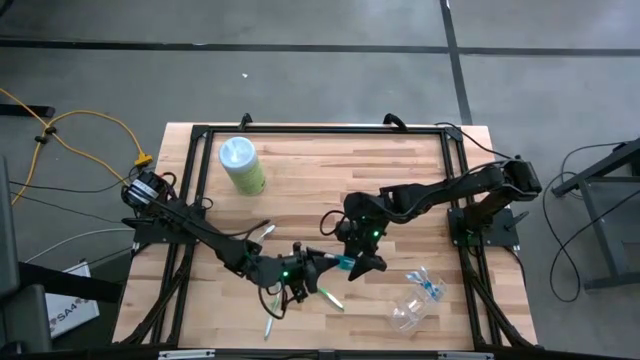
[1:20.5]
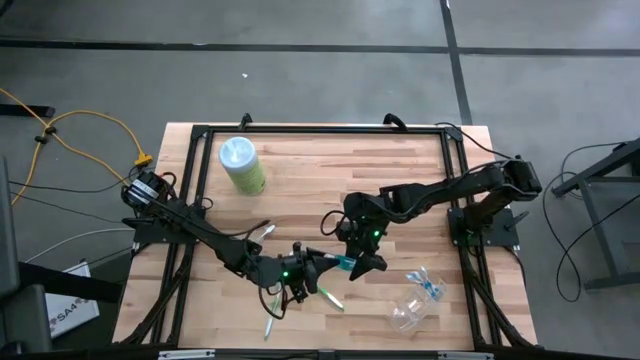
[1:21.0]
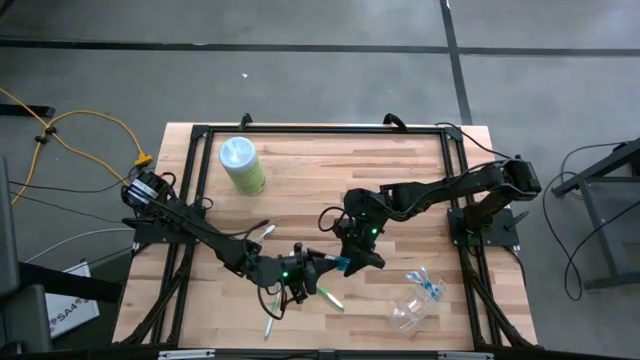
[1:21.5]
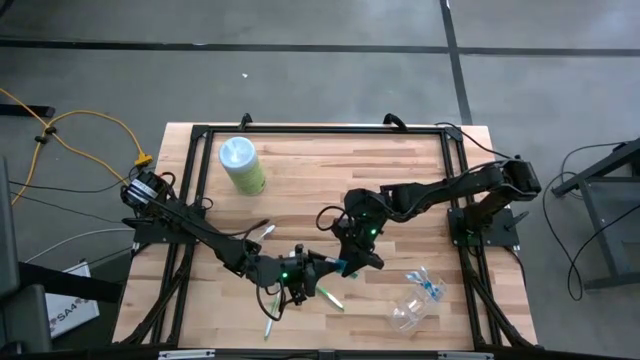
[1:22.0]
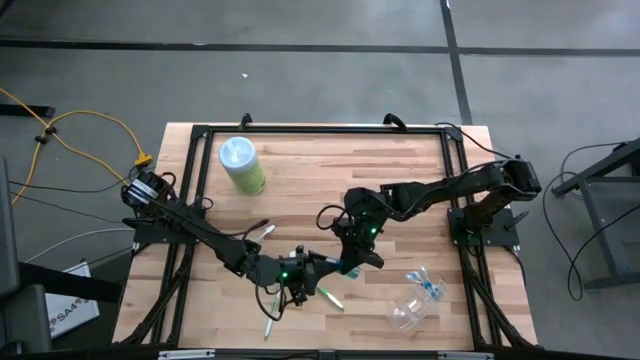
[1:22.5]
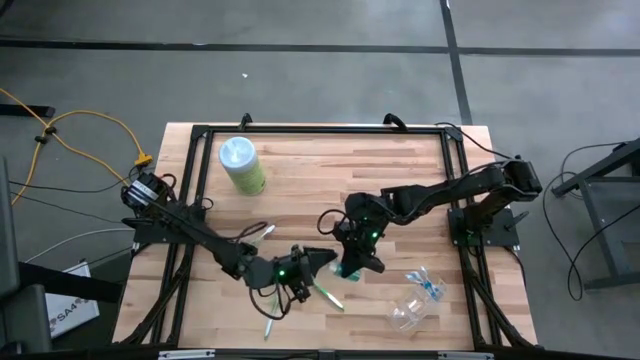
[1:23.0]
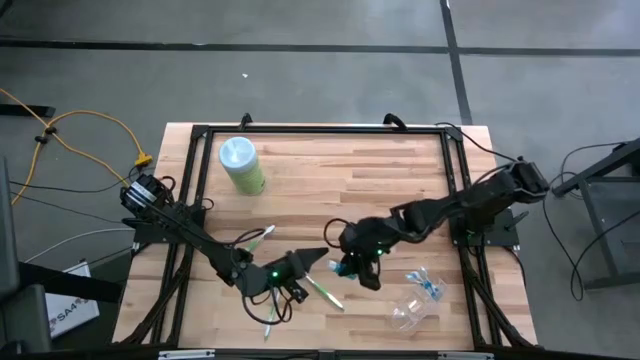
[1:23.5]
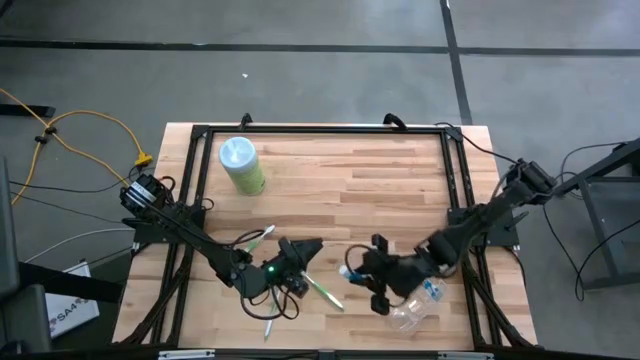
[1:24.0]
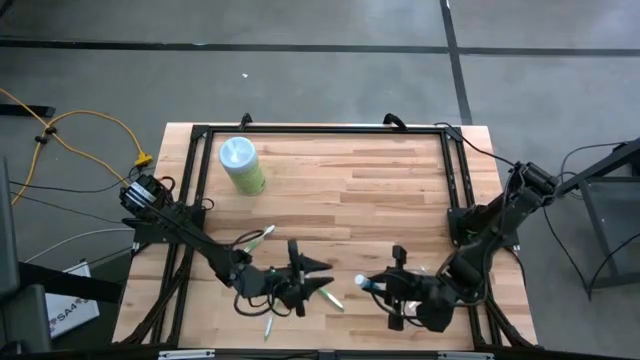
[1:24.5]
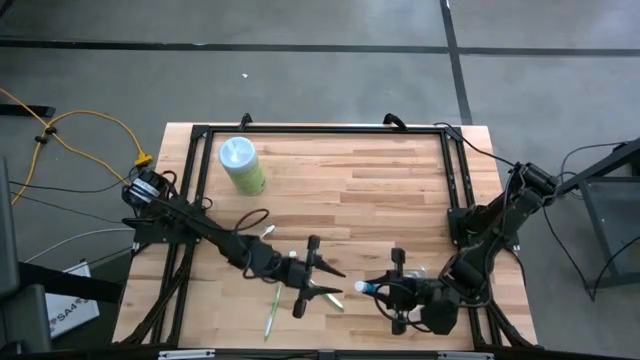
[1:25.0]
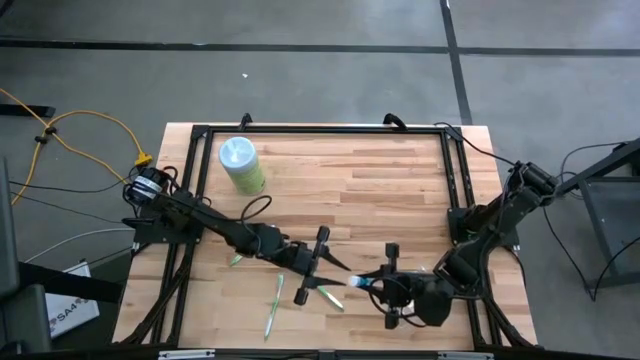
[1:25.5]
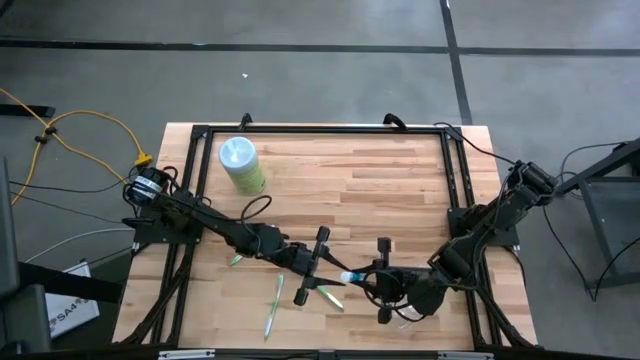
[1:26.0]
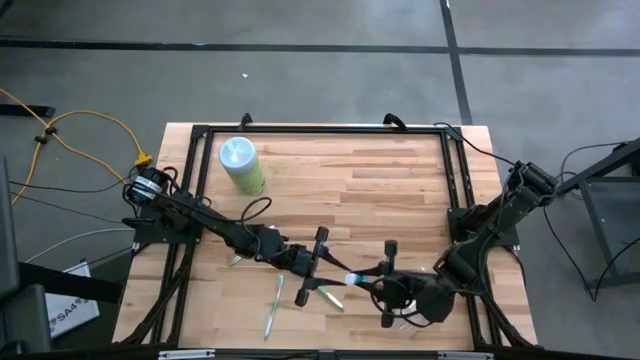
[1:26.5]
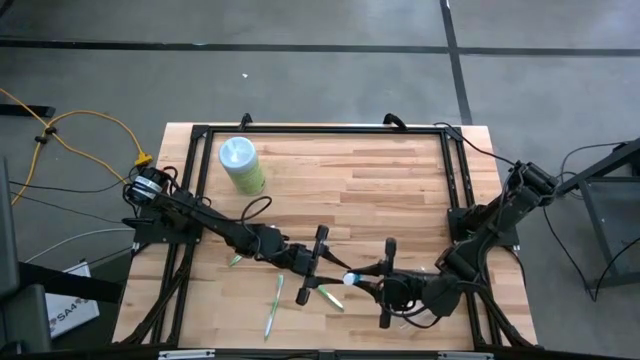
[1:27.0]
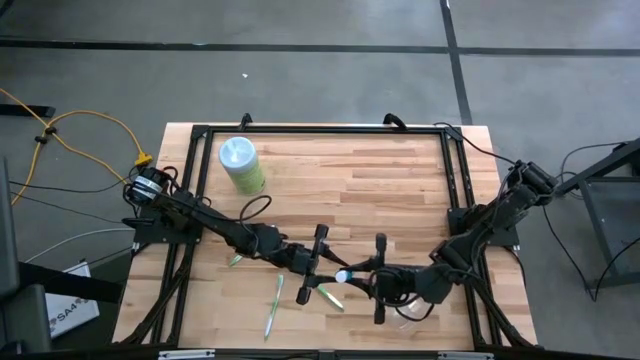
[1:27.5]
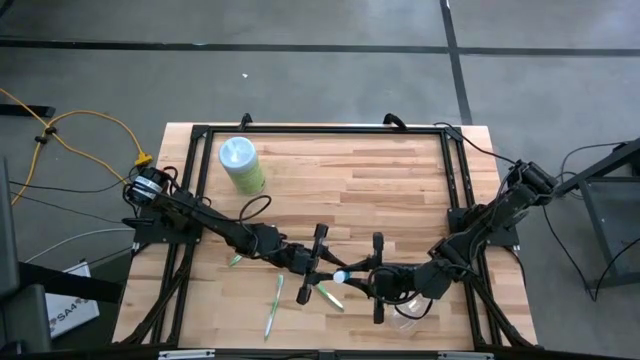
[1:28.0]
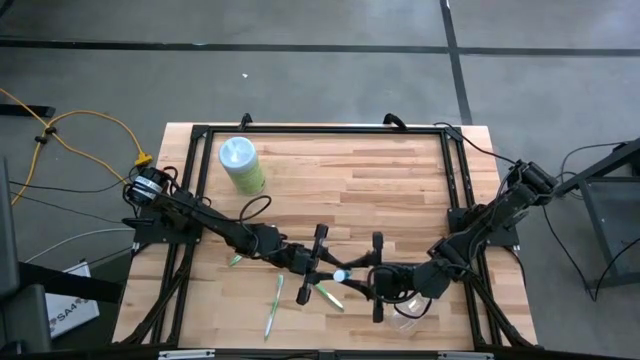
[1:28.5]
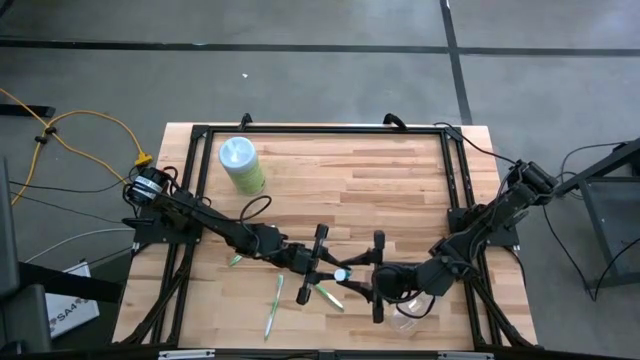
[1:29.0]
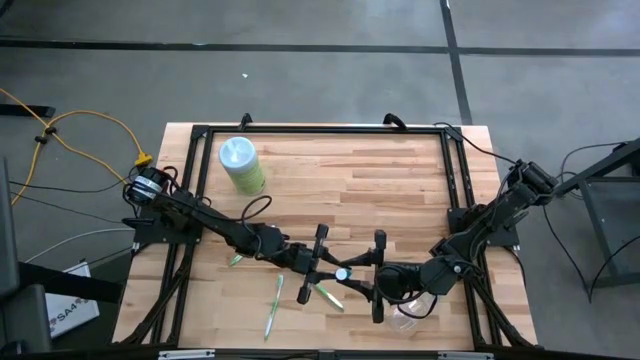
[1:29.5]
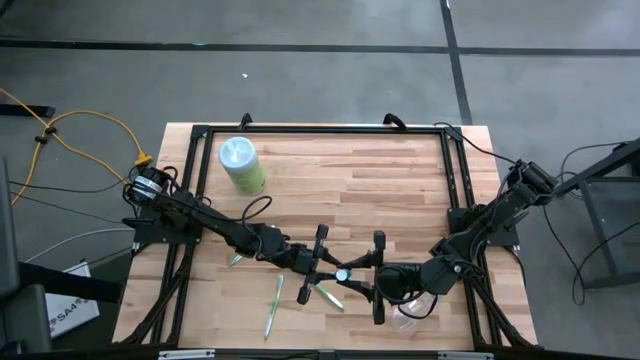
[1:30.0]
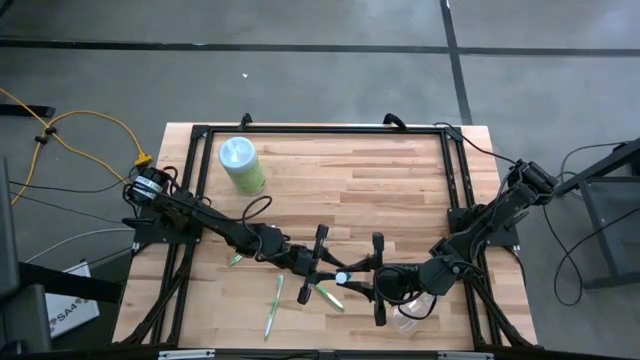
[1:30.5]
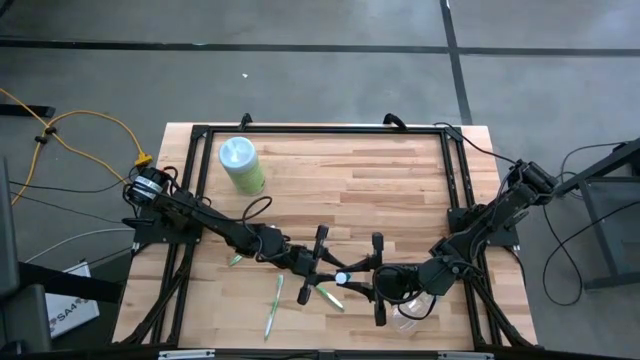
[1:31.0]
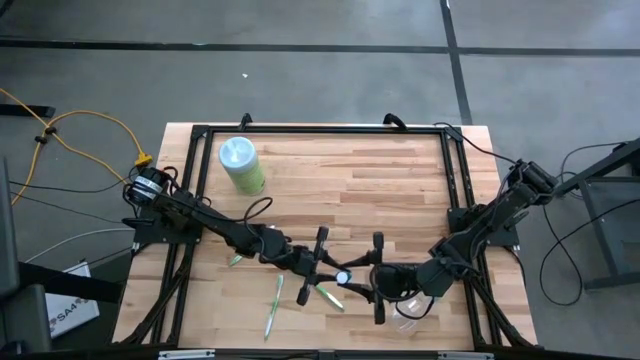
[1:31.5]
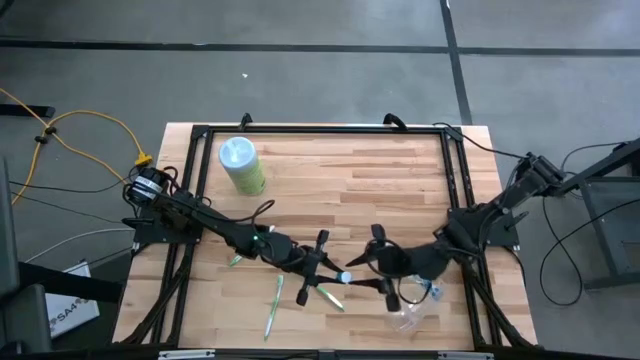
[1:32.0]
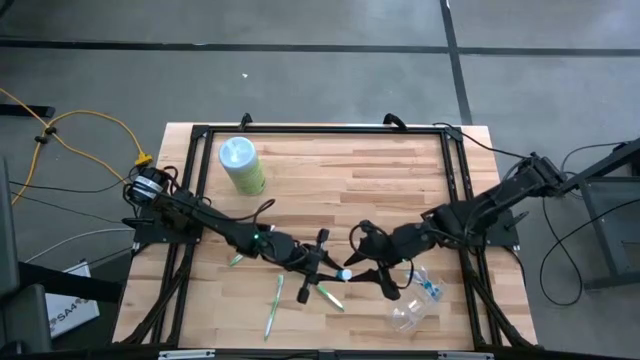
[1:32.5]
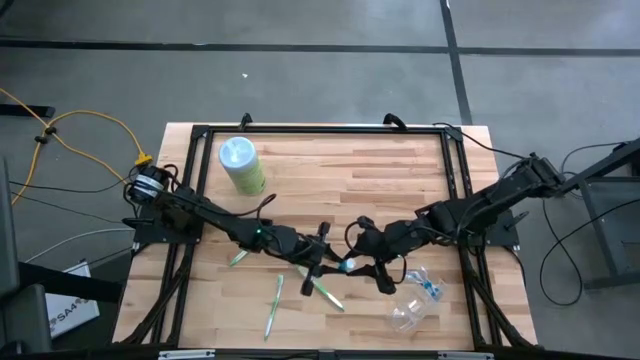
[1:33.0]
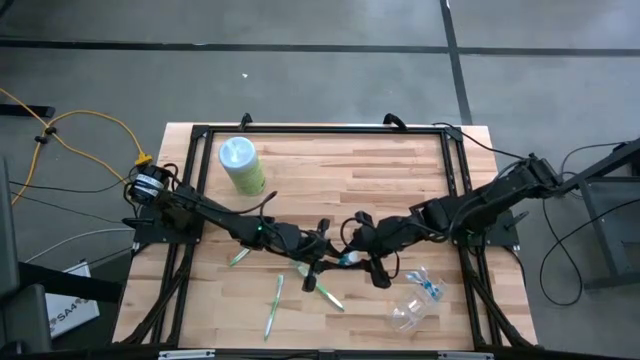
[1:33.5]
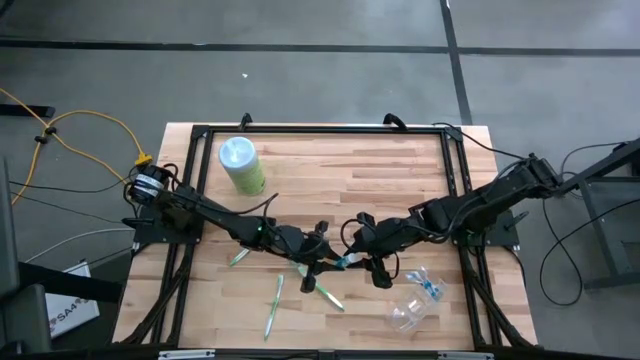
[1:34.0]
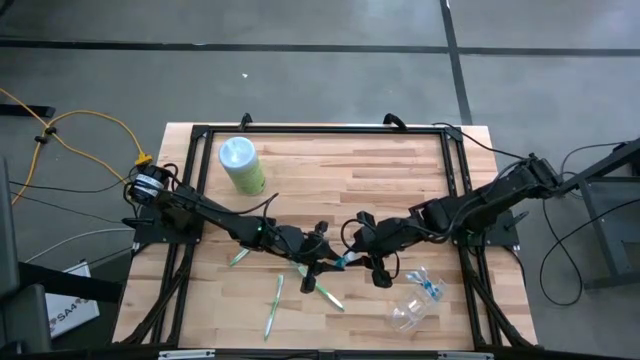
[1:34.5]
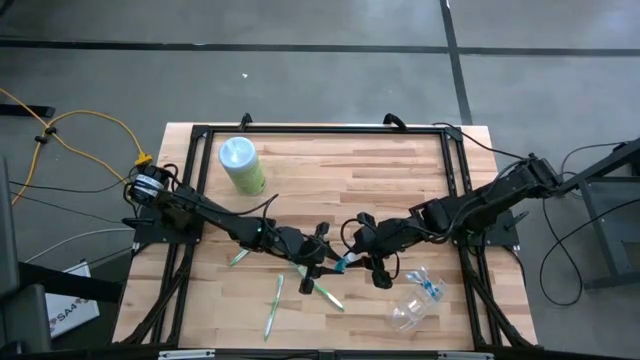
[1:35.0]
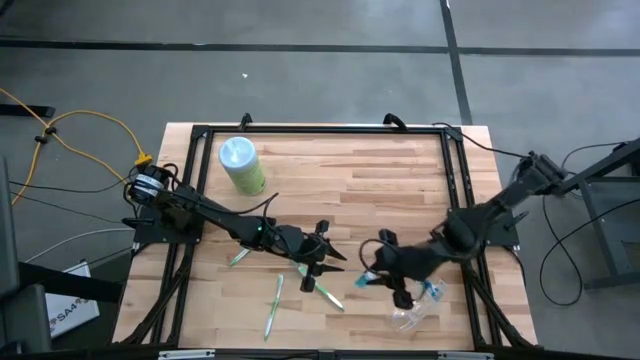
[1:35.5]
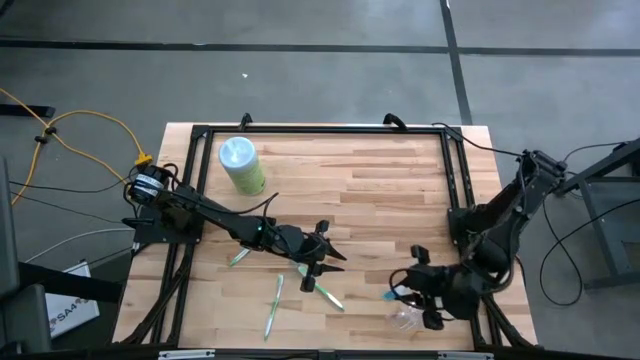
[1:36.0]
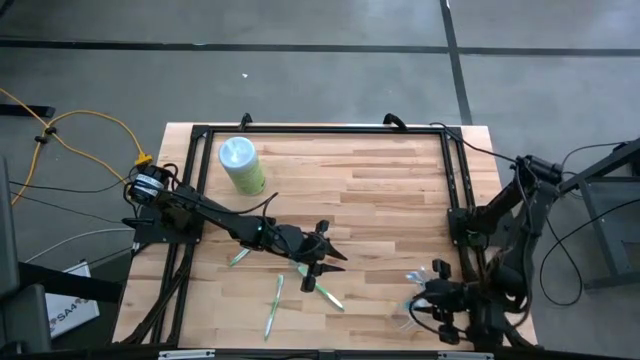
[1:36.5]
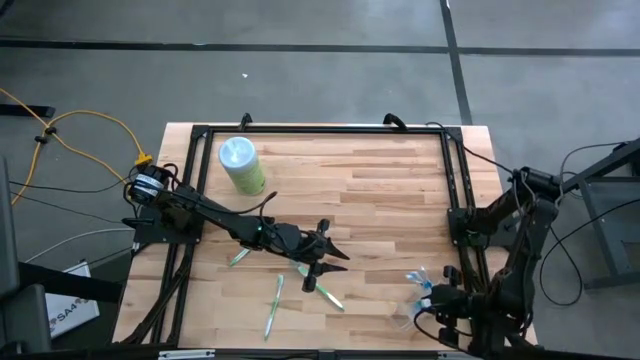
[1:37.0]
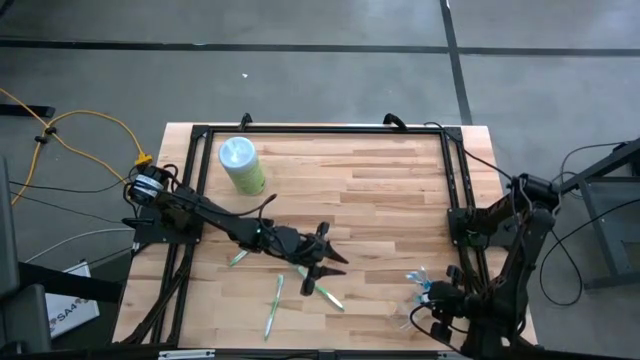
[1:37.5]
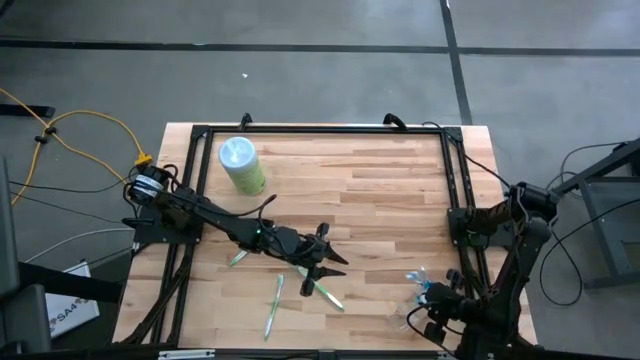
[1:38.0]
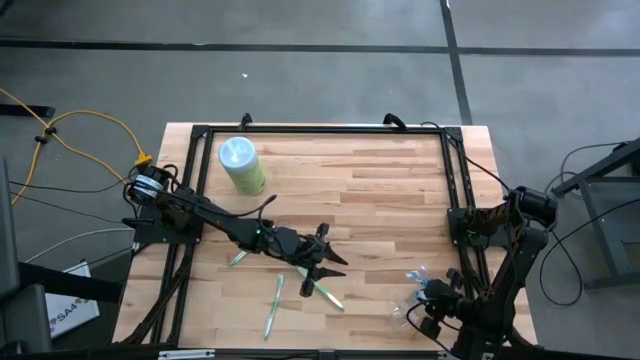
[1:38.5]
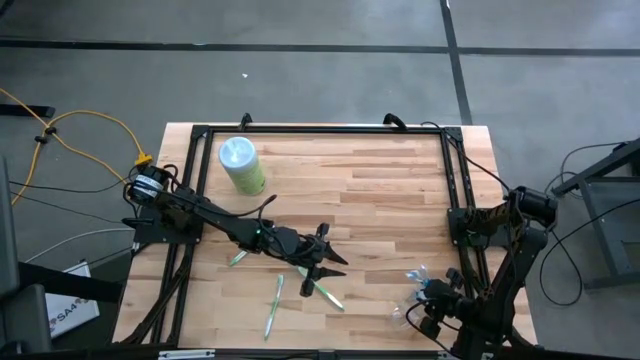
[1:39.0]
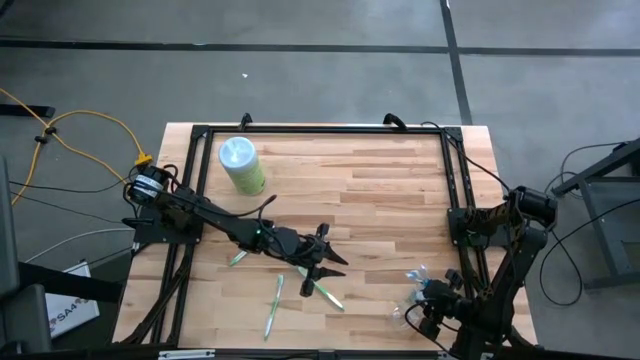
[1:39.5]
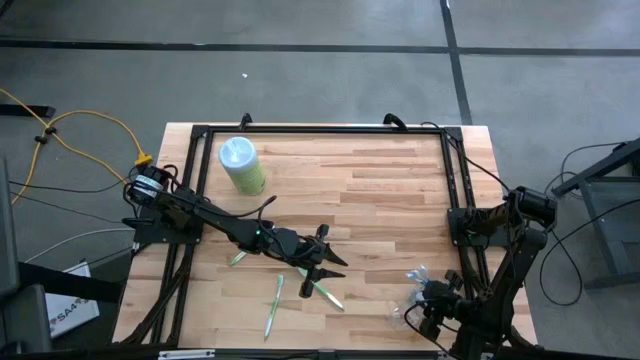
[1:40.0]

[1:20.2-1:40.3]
Task: Pick & Place toothbrushing station
Put the top blue mouthwash bottle into the middle section of the transparent organizer
